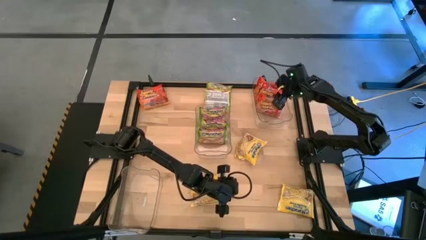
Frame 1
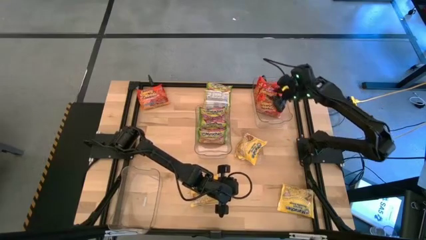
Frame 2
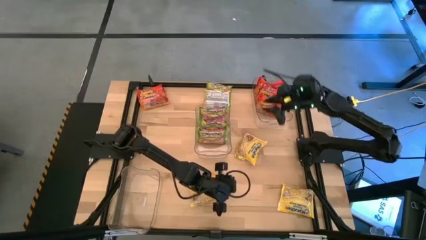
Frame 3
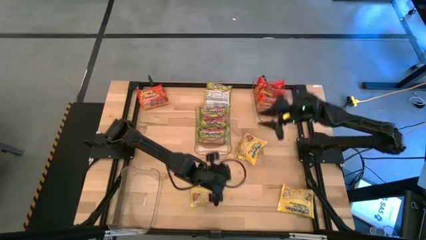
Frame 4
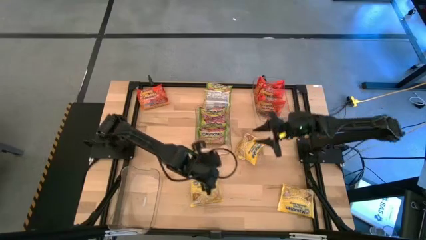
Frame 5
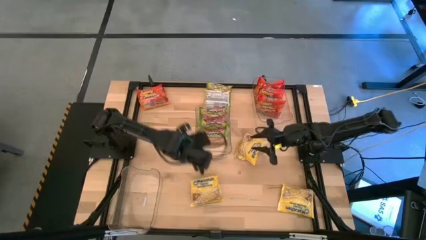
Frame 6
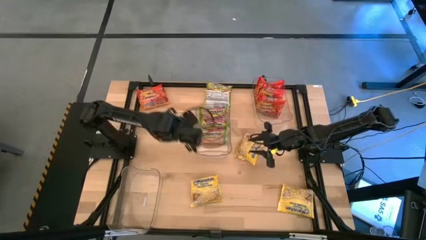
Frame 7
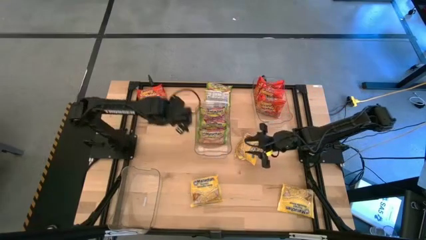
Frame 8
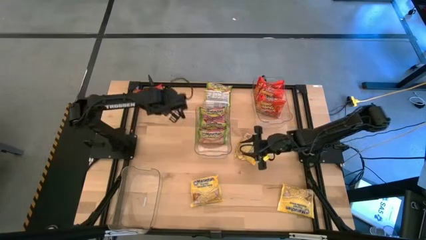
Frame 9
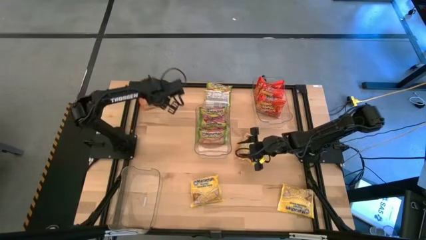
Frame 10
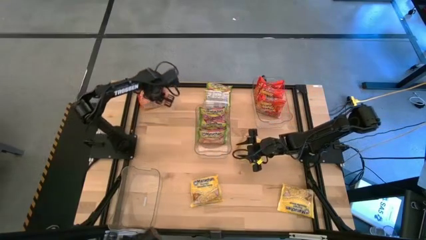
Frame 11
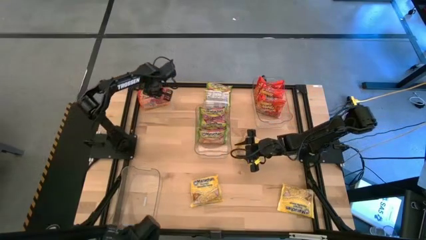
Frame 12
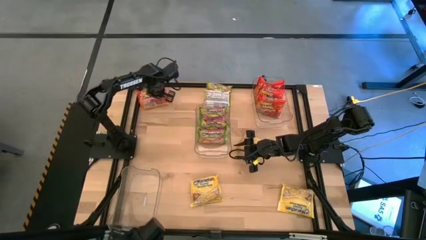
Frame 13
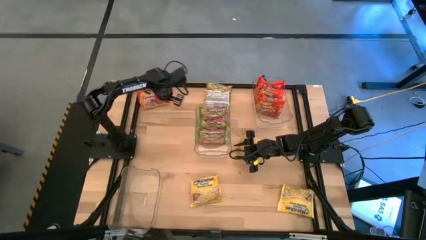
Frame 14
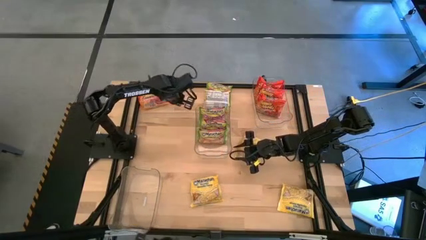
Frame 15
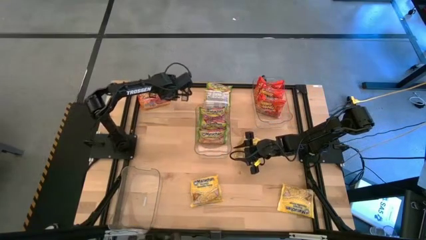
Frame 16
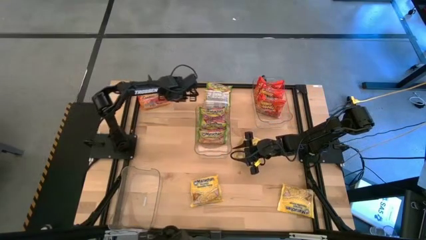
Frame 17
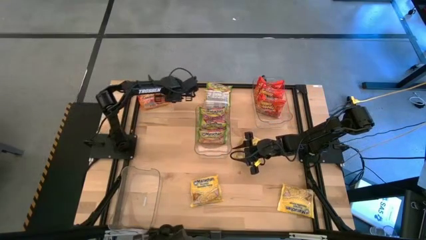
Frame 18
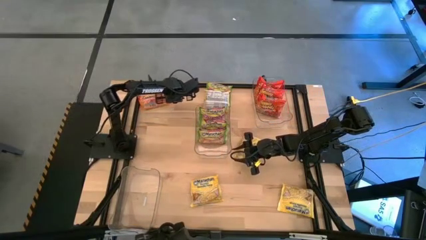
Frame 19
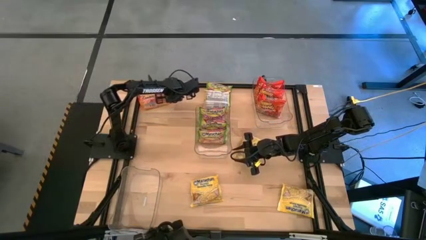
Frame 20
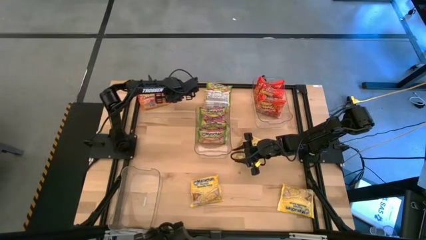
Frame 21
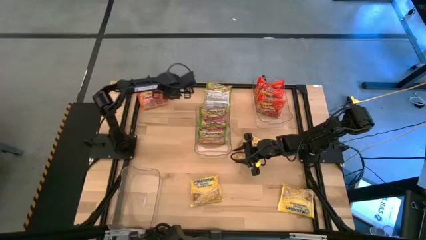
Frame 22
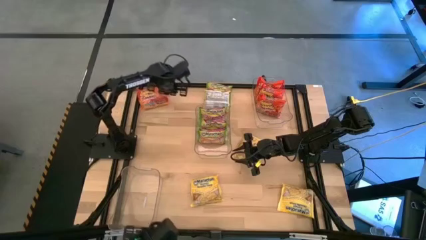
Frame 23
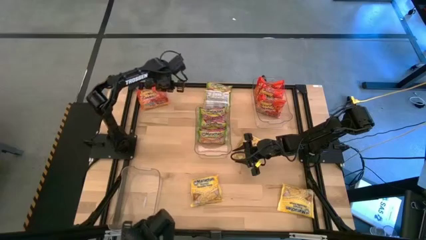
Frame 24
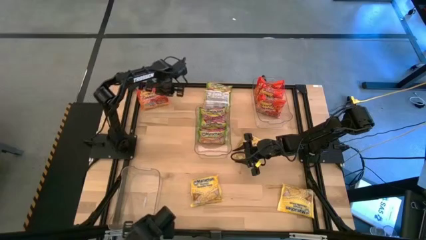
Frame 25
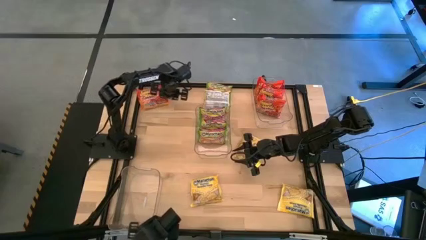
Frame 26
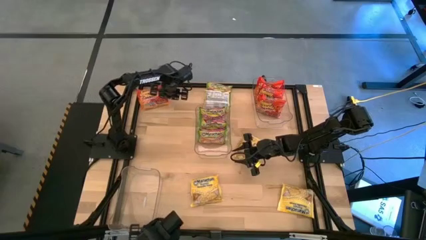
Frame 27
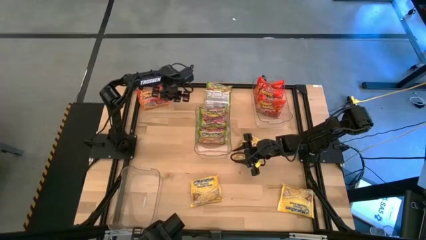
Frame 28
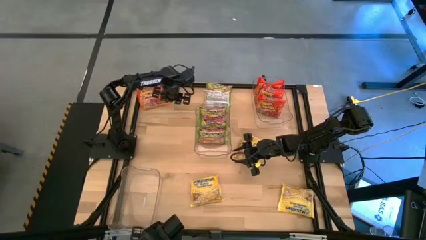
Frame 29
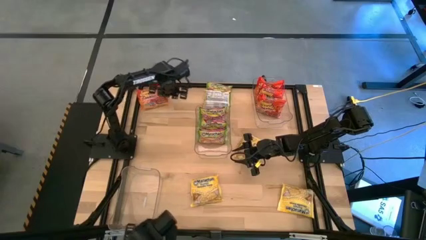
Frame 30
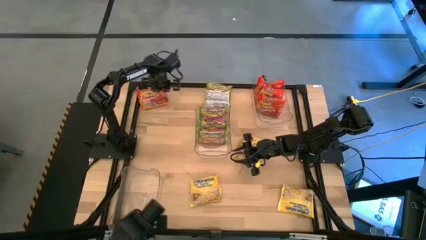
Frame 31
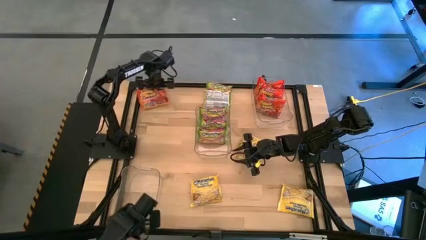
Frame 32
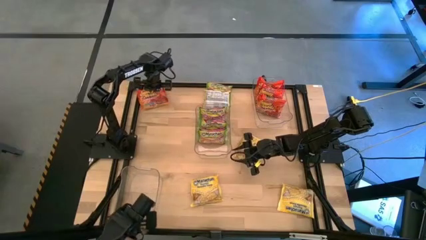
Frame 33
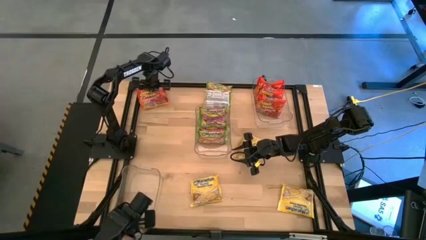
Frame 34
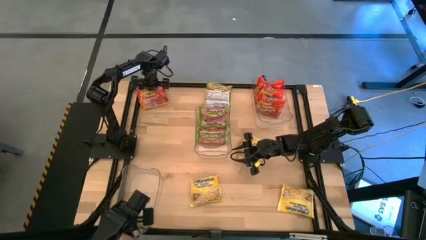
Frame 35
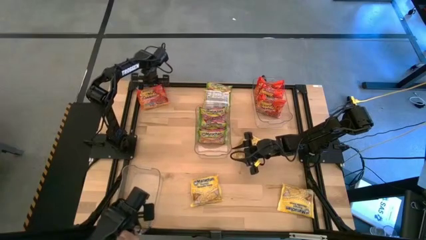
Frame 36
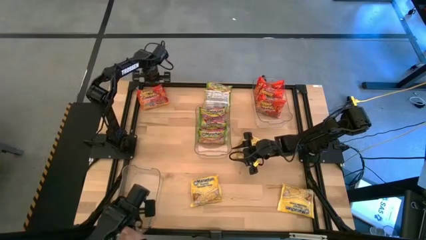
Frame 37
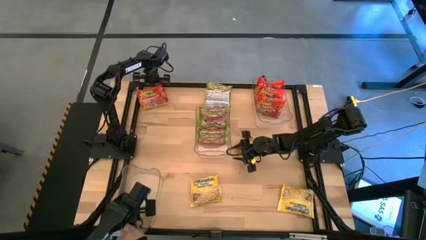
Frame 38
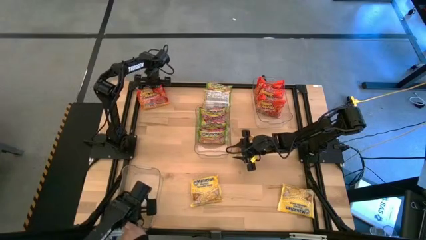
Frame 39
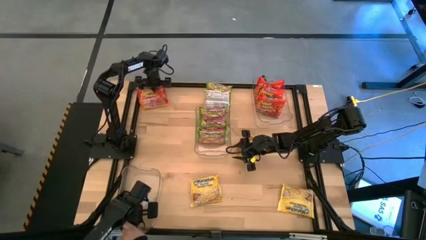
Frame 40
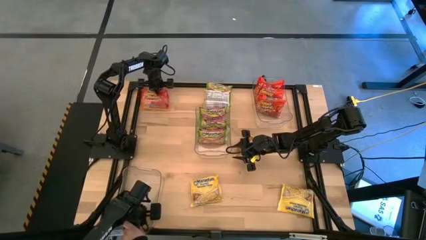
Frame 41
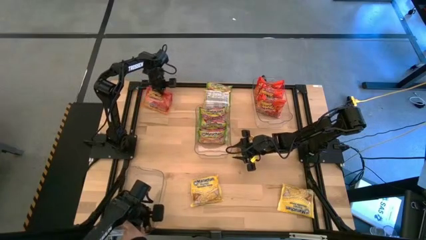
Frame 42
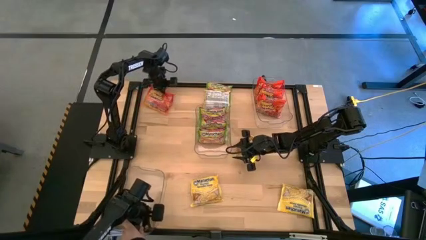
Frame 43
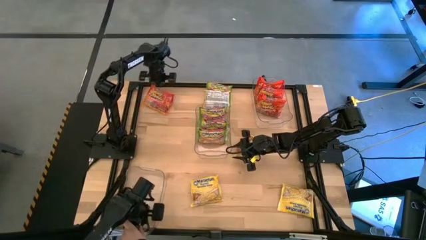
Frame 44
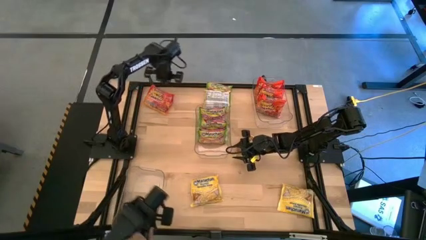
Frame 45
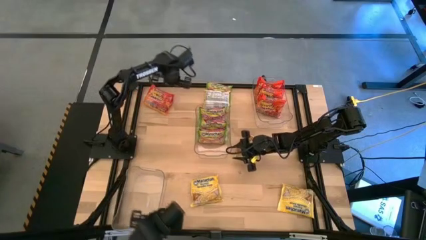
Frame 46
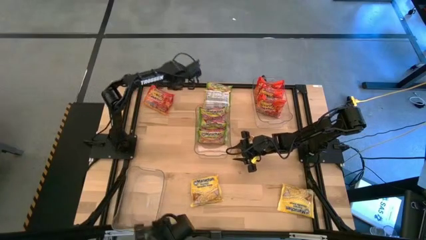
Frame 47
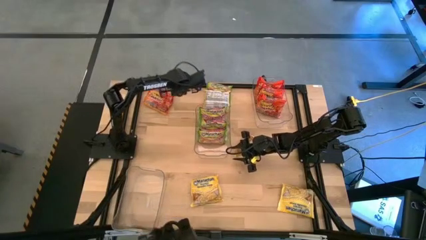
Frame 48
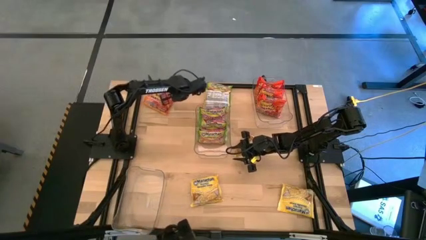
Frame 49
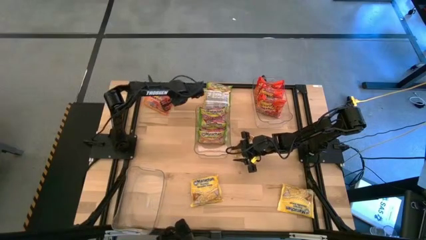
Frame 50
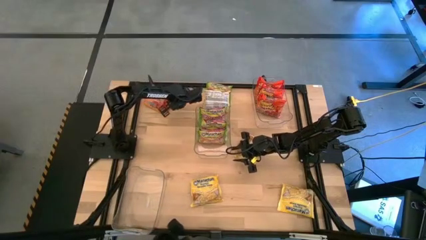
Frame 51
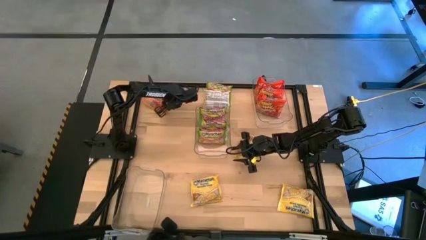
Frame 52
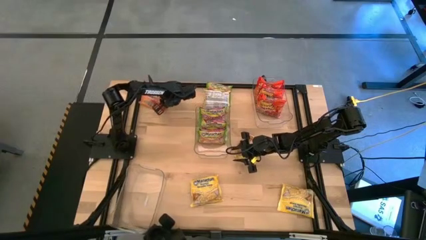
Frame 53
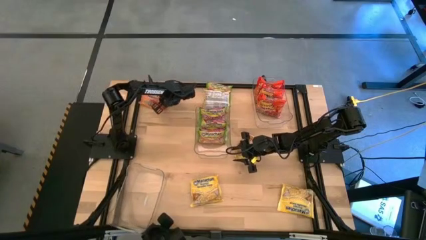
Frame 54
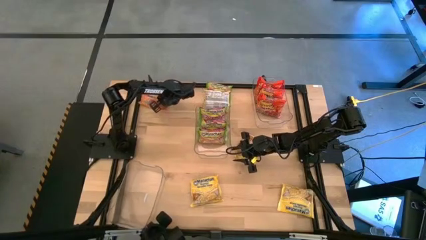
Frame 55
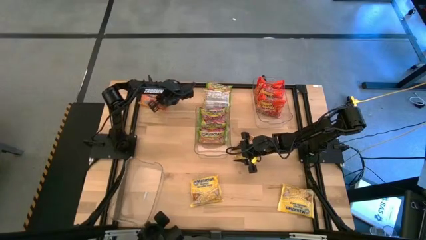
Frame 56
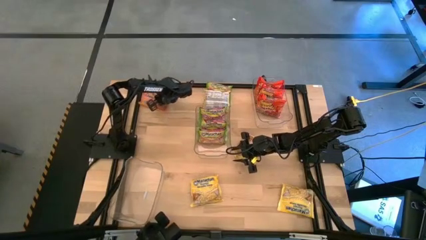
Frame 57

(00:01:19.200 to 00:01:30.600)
Task: Sort Maruchan noodles
Put the orange noodle pack into the top right transparent bin
